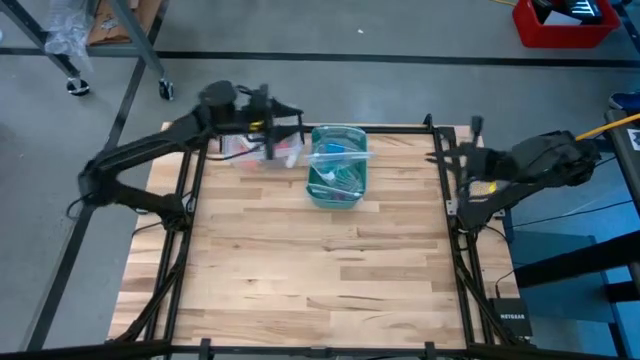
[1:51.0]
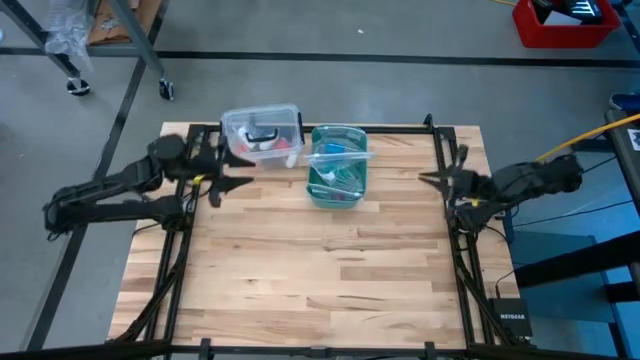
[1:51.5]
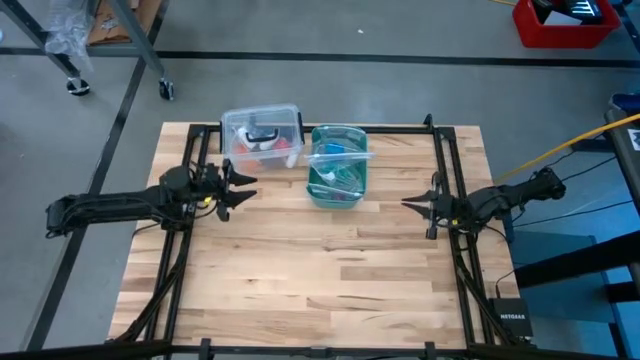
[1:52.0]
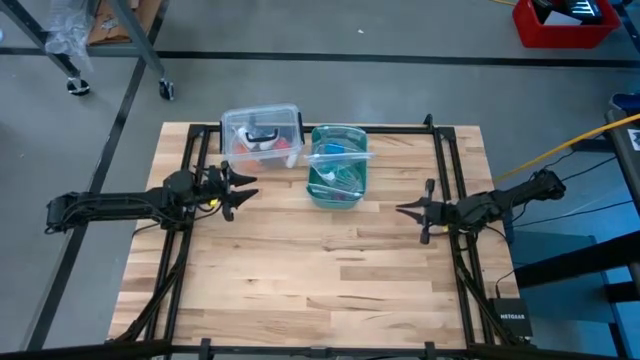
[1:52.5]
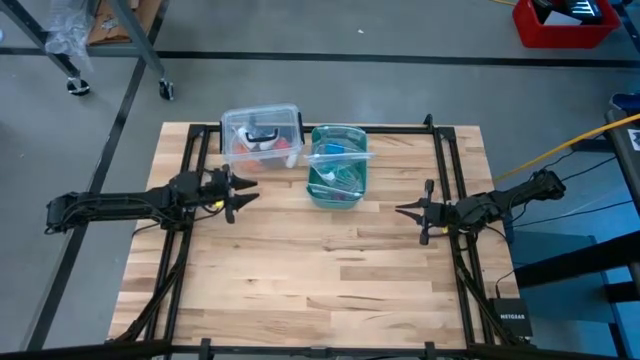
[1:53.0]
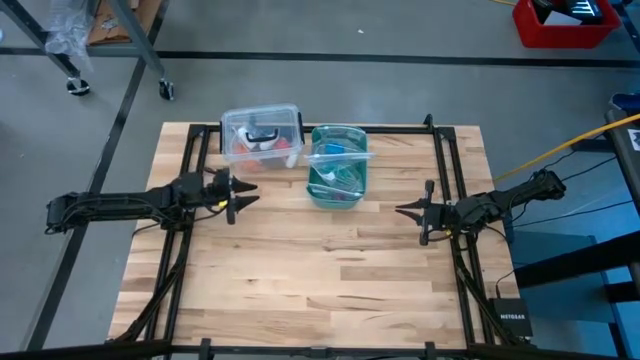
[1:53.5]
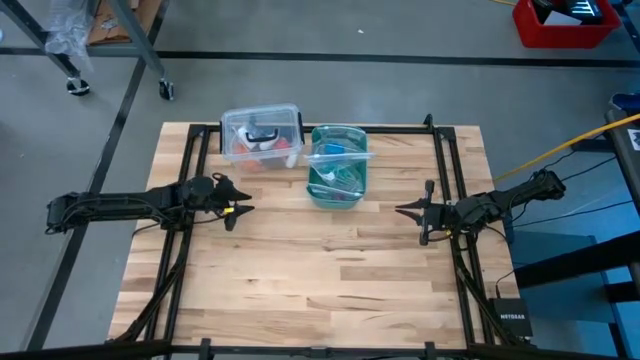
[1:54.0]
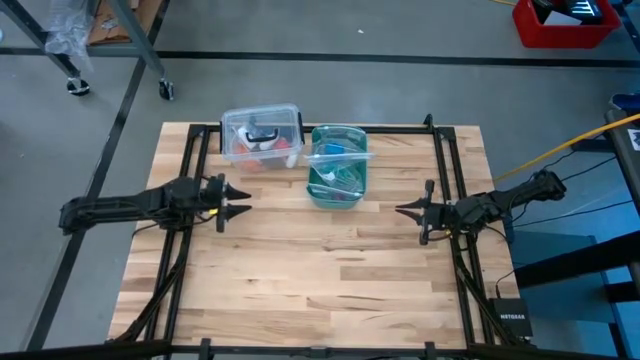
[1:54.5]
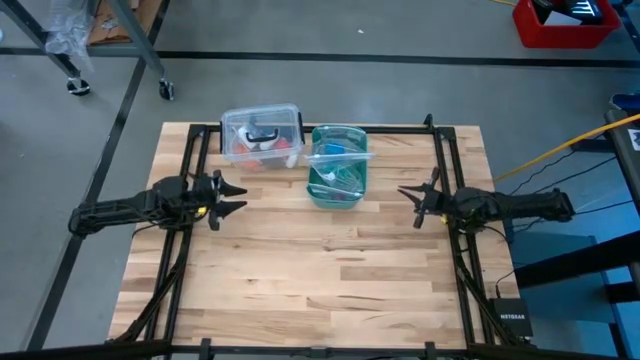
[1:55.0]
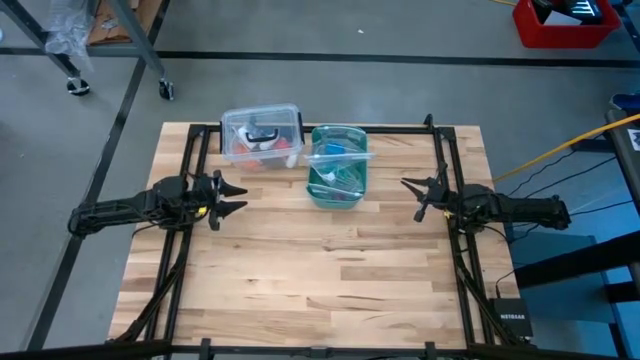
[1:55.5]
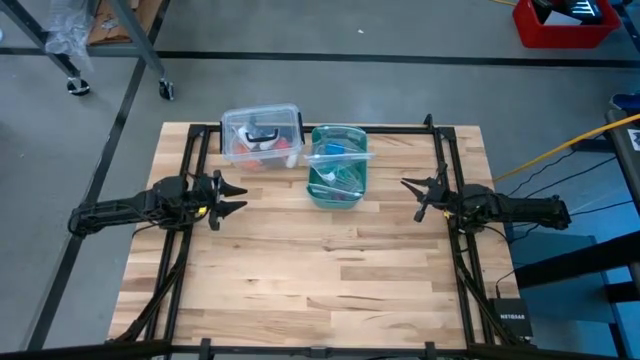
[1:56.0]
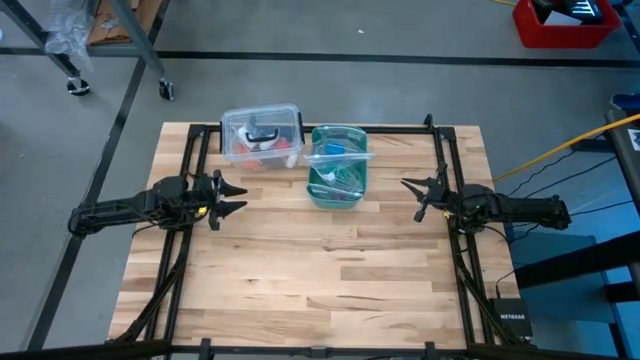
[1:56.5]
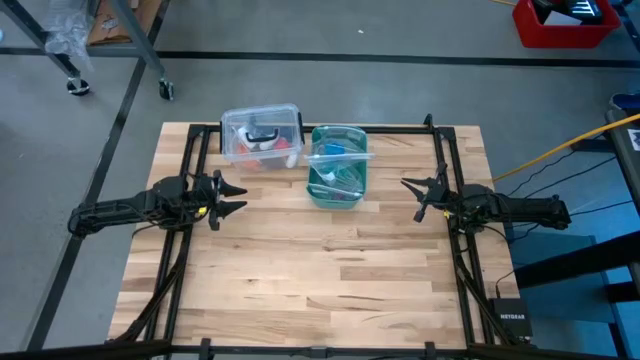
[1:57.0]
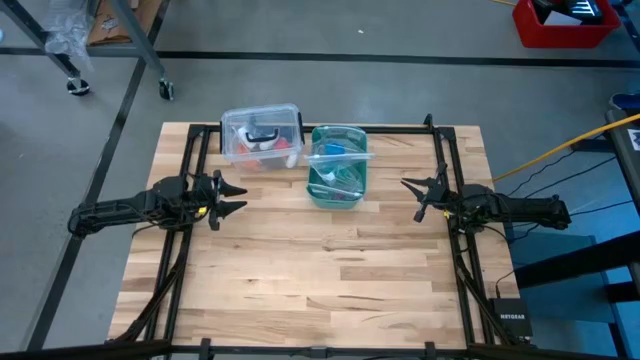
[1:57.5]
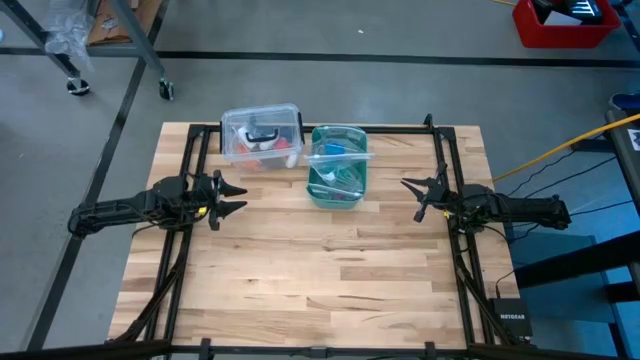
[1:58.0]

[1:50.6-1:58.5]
Task: Roll bandage
Return to Home Position

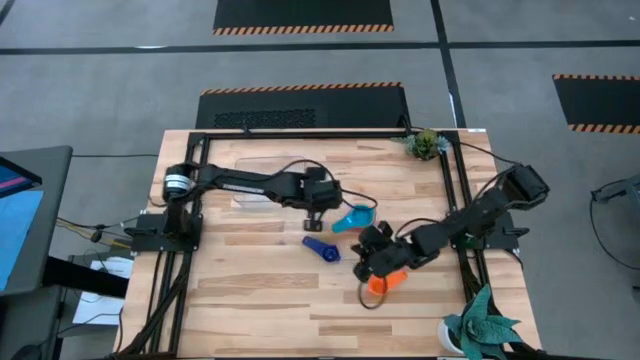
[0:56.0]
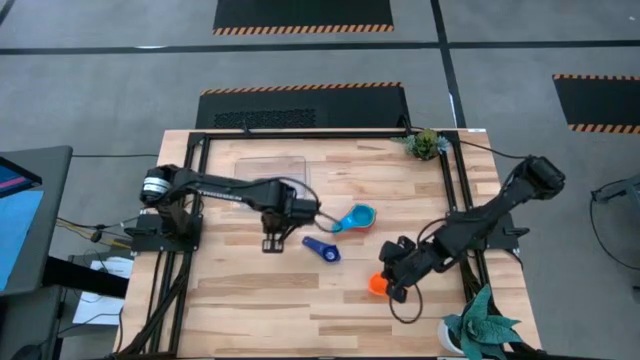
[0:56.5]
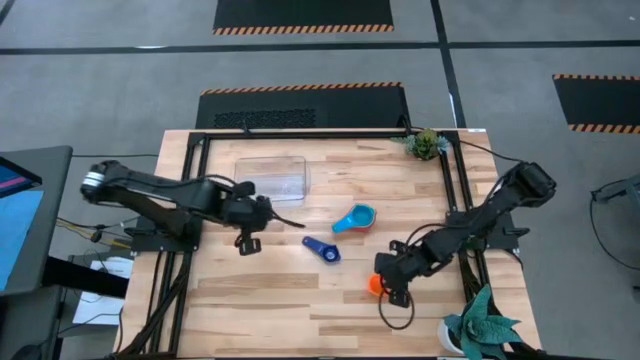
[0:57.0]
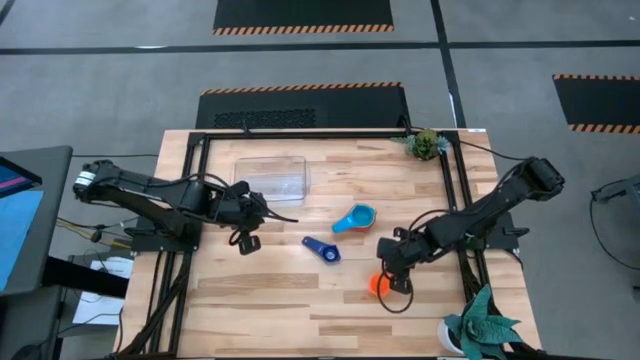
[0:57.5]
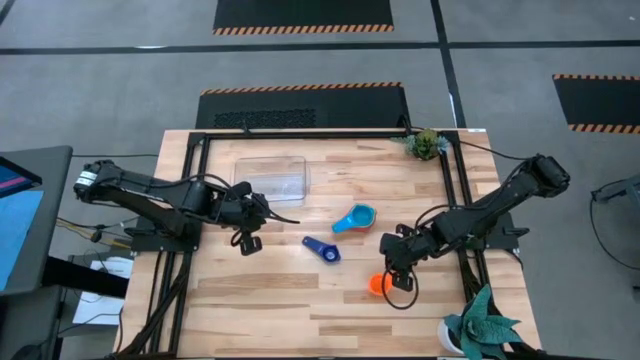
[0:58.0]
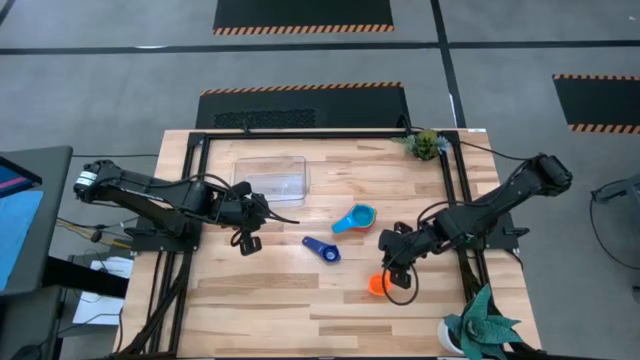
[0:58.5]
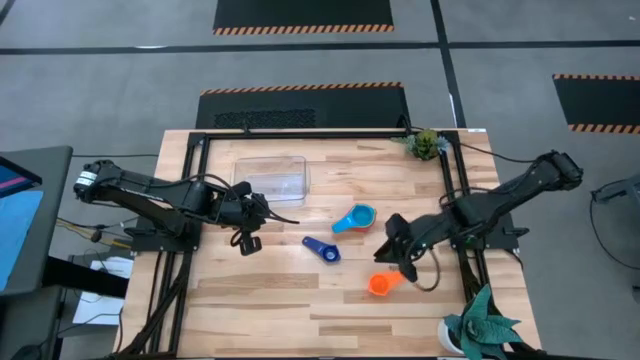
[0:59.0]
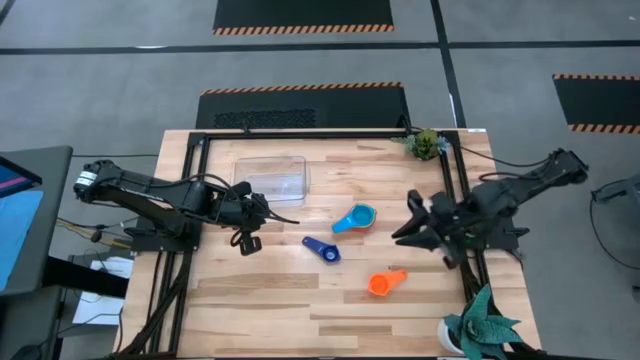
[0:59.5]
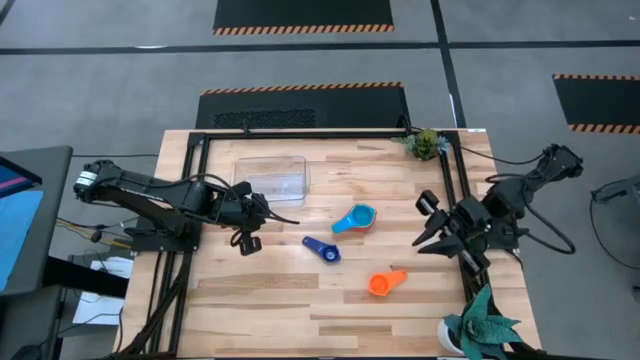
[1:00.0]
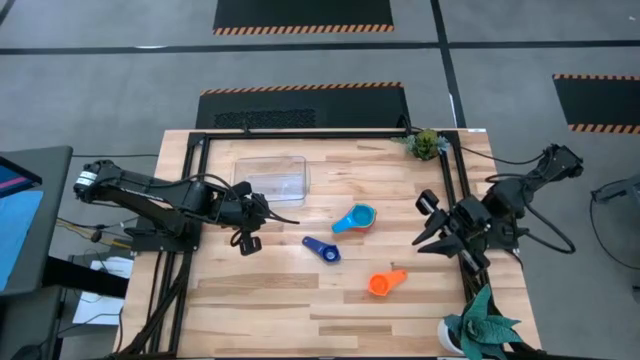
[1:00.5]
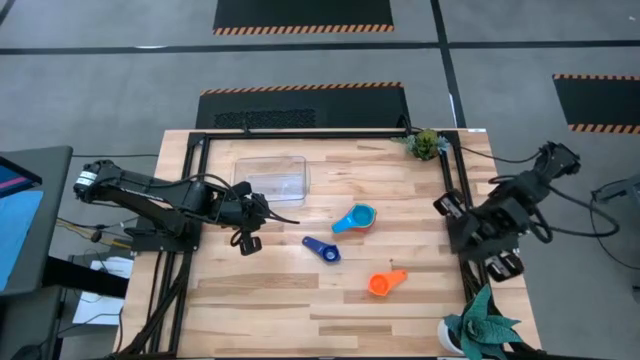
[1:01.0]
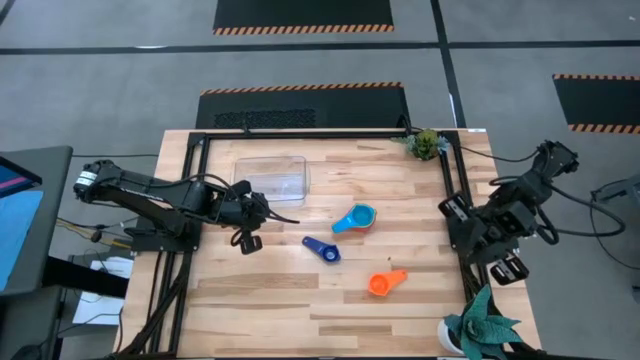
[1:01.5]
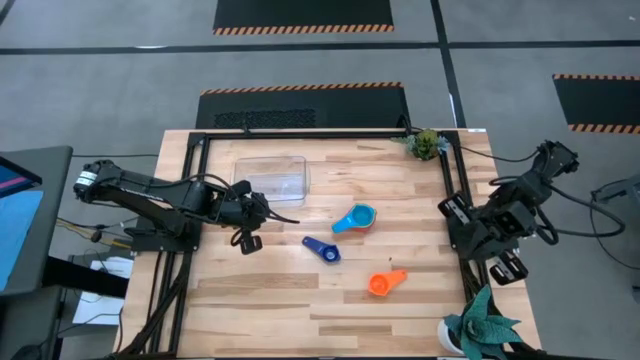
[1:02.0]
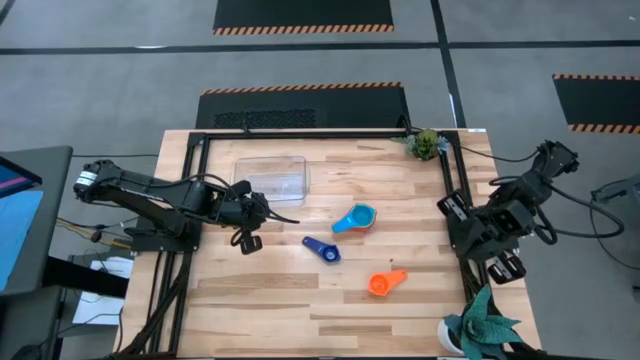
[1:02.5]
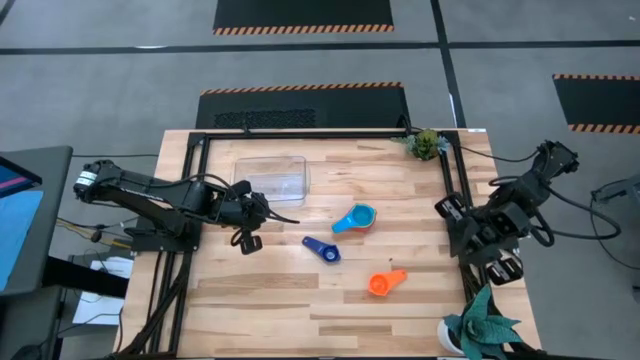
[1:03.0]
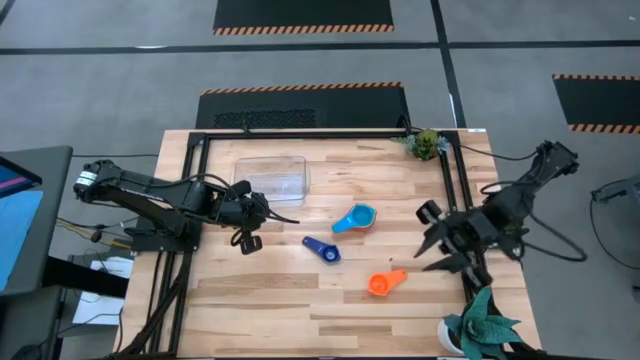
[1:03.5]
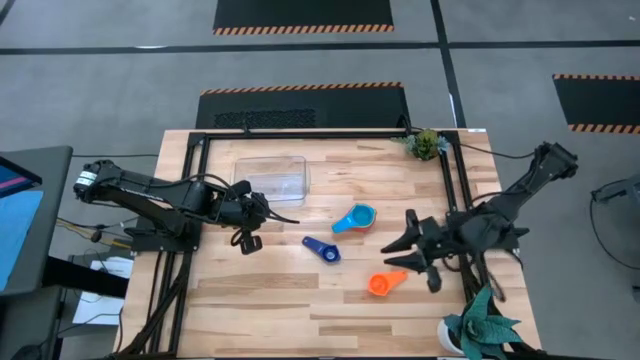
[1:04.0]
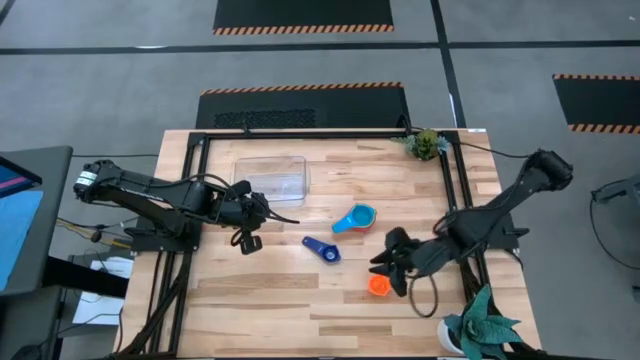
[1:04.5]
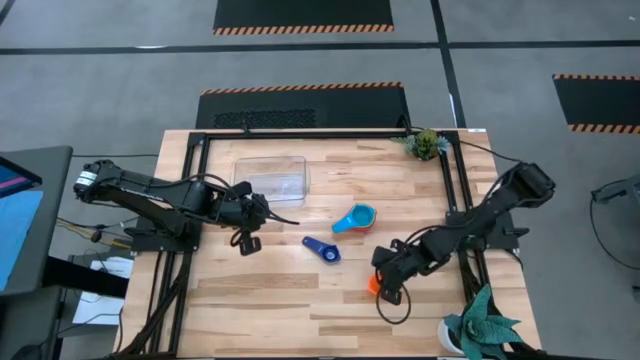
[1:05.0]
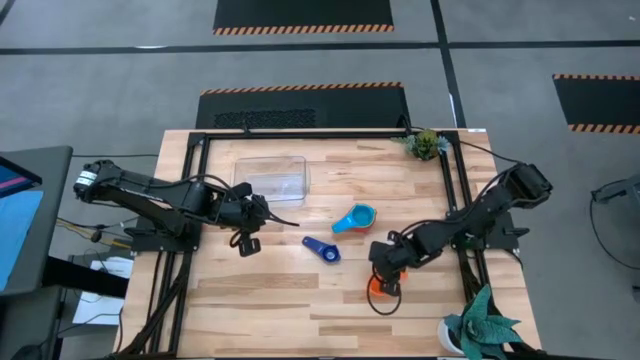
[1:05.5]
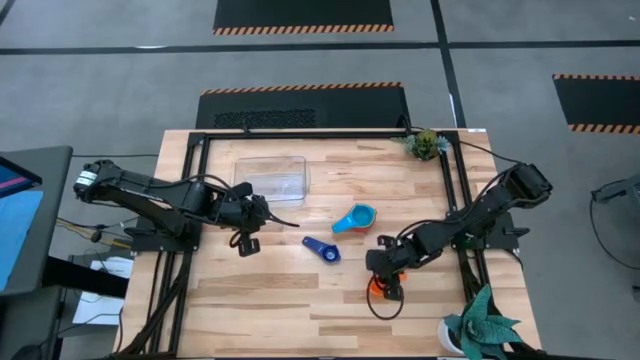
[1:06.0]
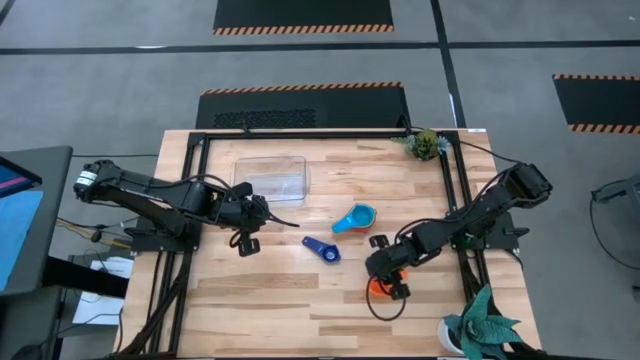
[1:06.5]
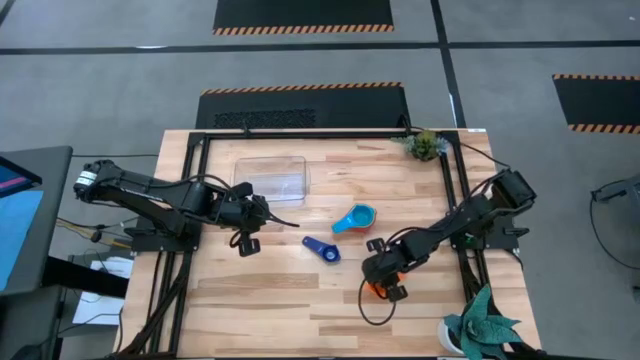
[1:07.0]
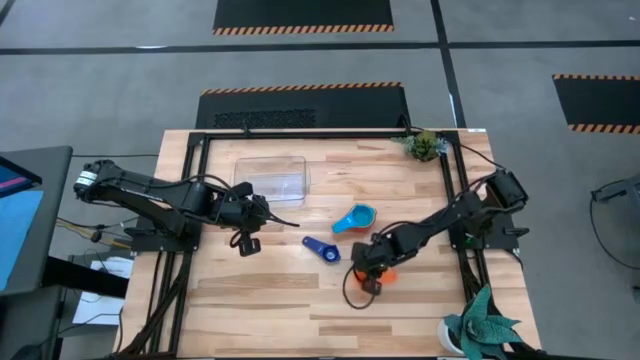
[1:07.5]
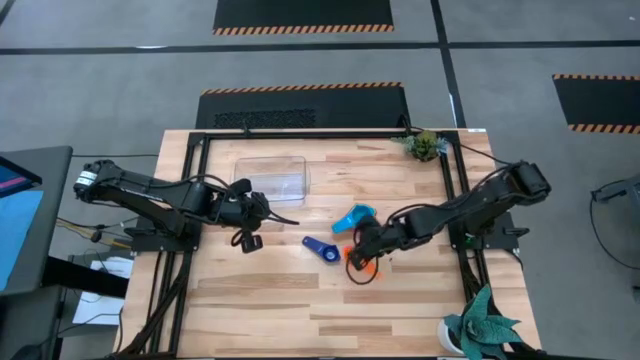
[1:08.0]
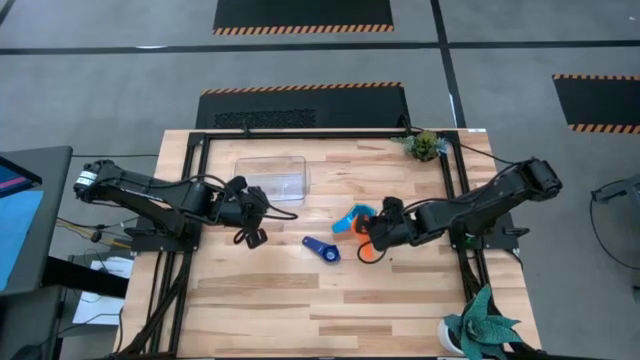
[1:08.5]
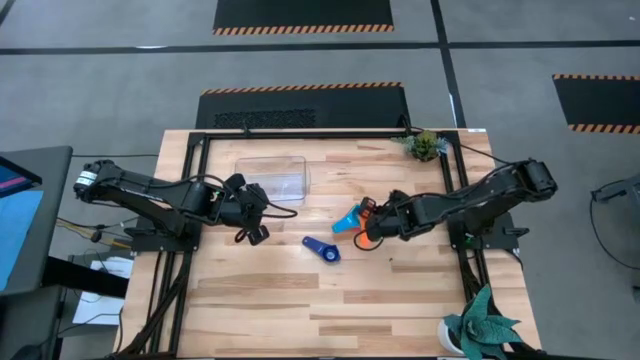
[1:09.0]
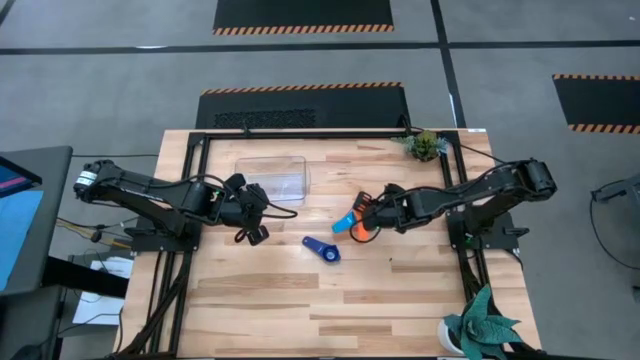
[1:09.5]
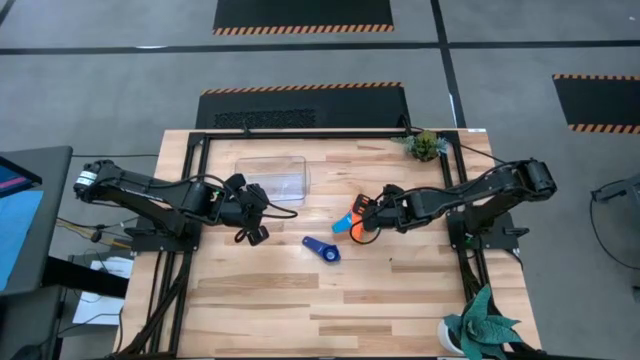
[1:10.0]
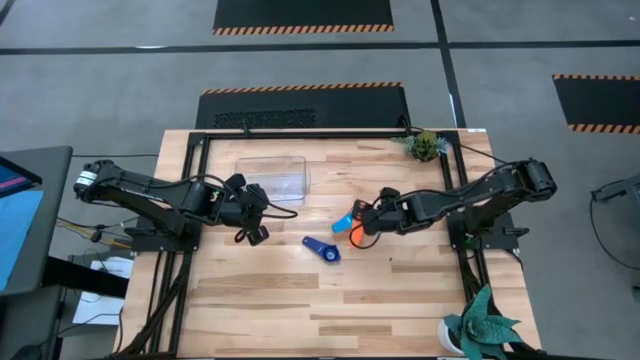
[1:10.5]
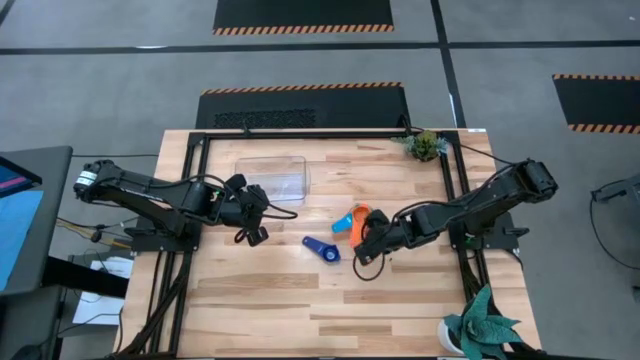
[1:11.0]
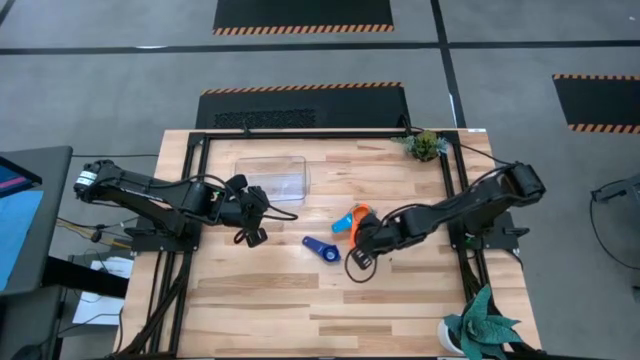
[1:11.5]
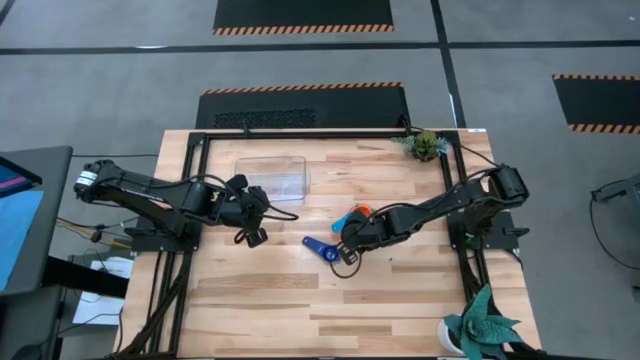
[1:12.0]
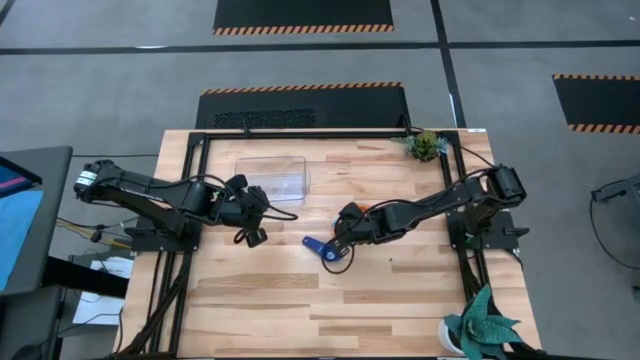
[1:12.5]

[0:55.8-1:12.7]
Task: Nest measuring cups in basket
Stack the orange measuring cup on top of the light blue measuring cup
